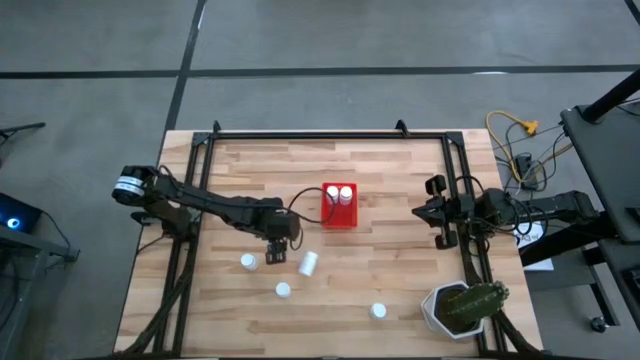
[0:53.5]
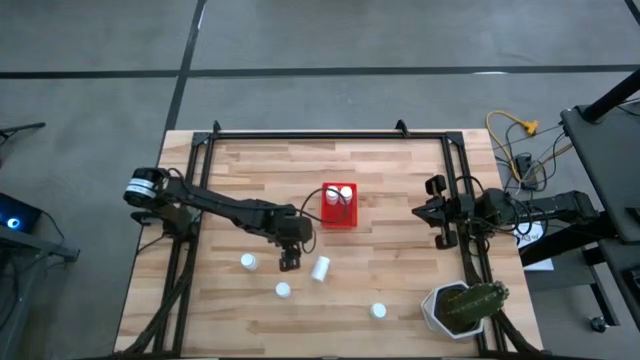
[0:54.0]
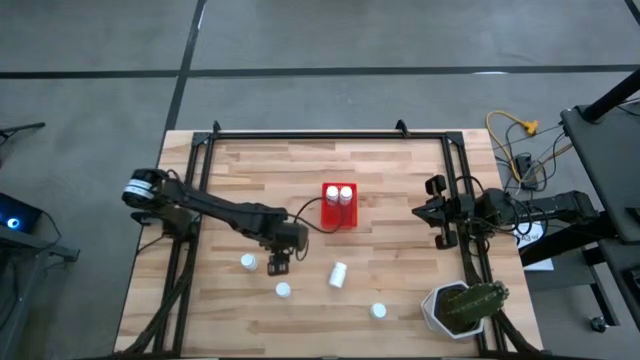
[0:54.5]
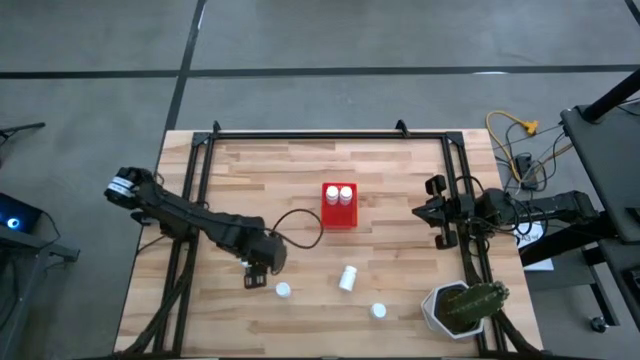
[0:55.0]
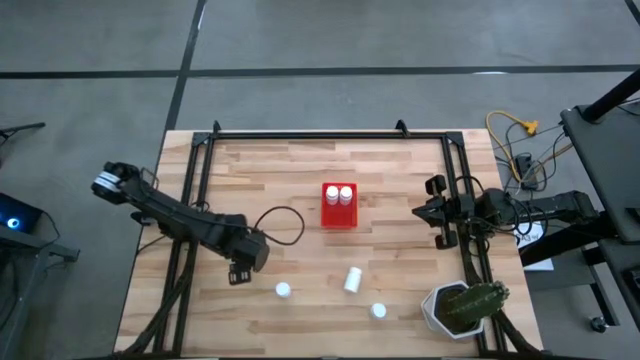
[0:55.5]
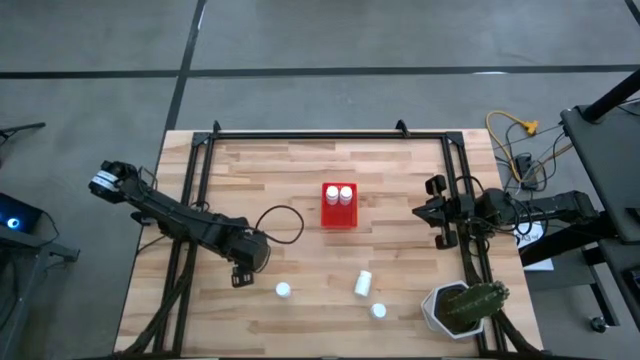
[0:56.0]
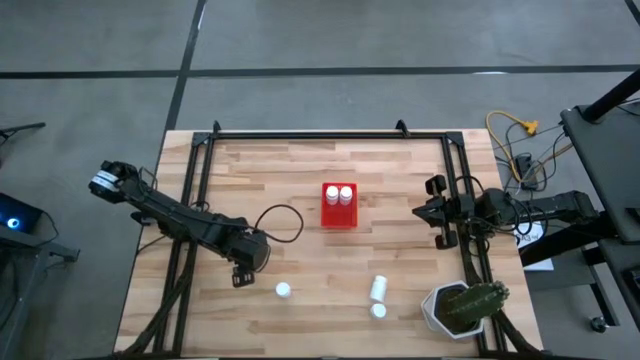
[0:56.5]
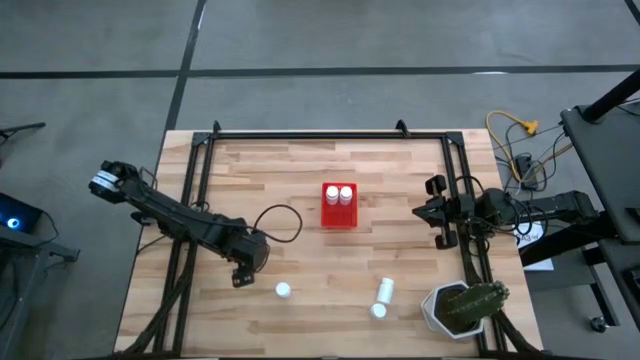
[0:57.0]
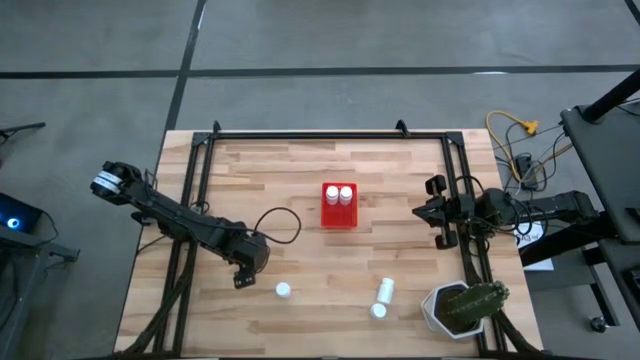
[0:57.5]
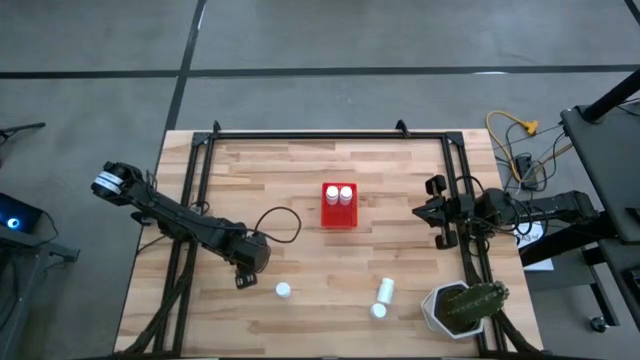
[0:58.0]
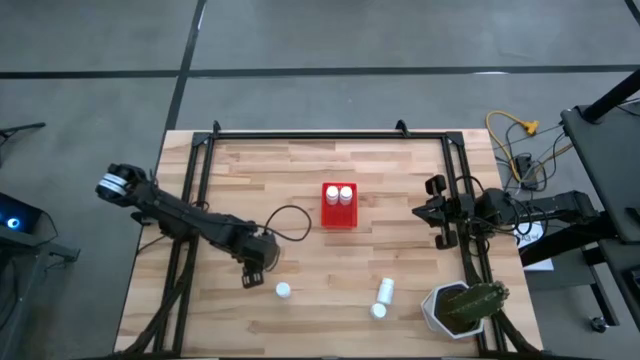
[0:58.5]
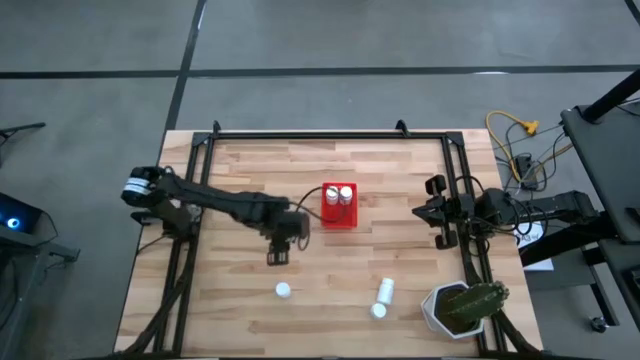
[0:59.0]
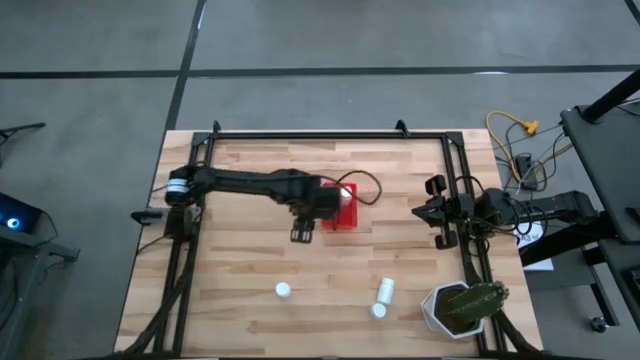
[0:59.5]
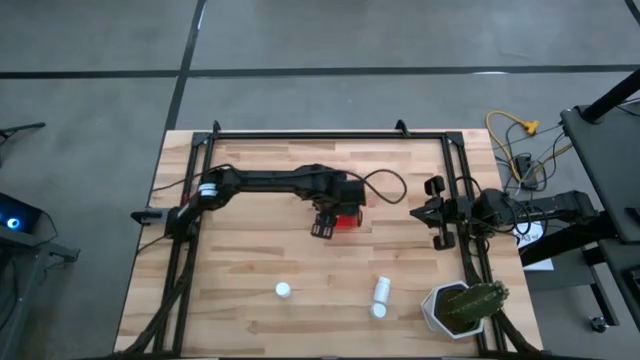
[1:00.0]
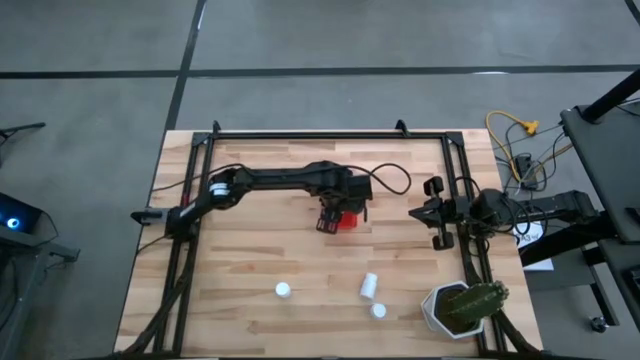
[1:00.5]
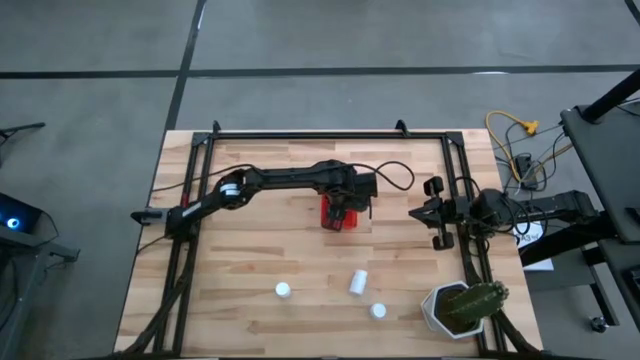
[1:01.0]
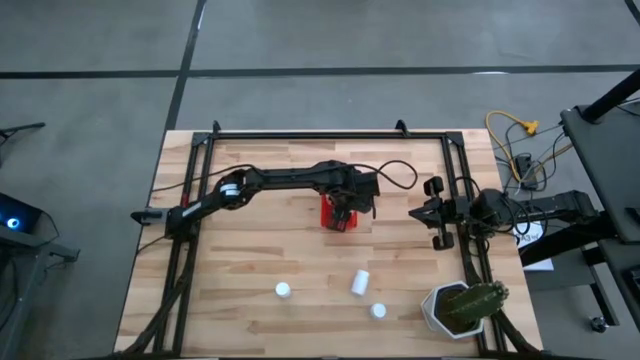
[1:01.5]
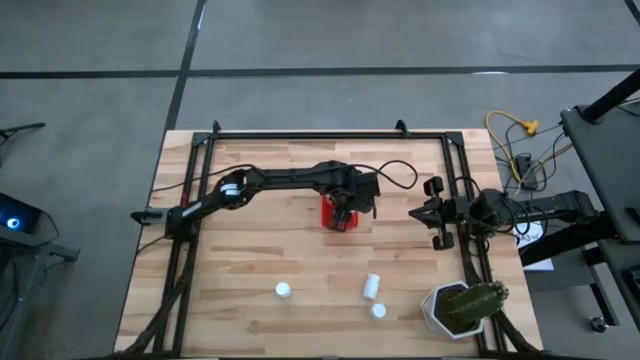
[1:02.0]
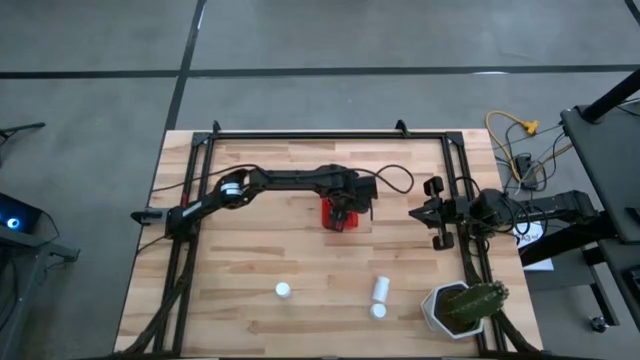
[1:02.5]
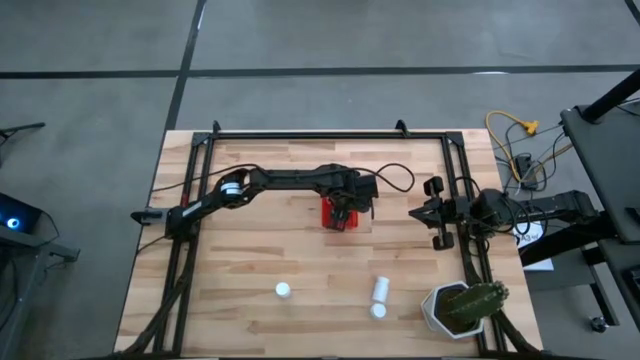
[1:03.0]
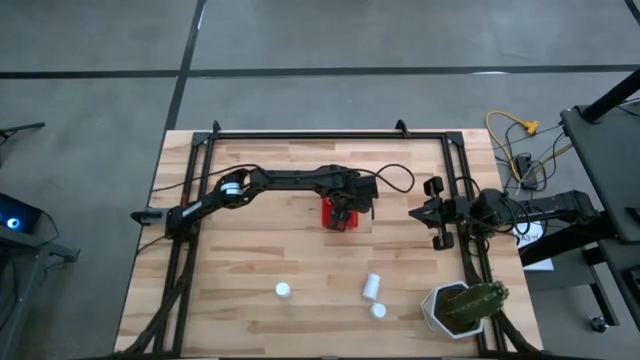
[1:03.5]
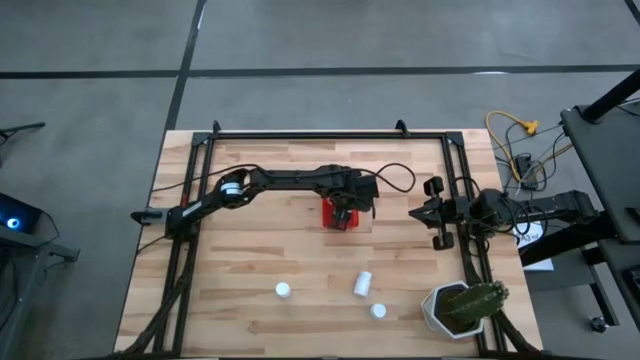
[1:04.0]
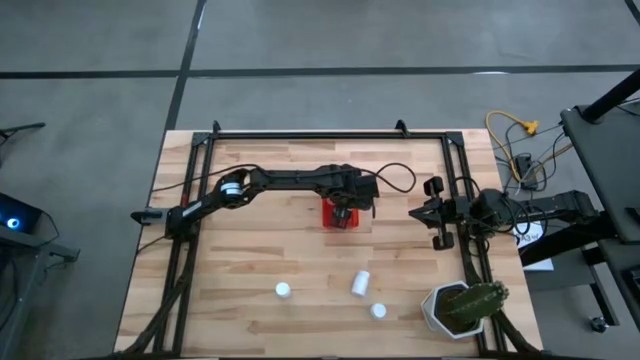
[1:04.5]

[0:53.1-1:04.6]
Task: Pick and place pill bottles into a basket
Put the top left white medicine bottle into the red bin

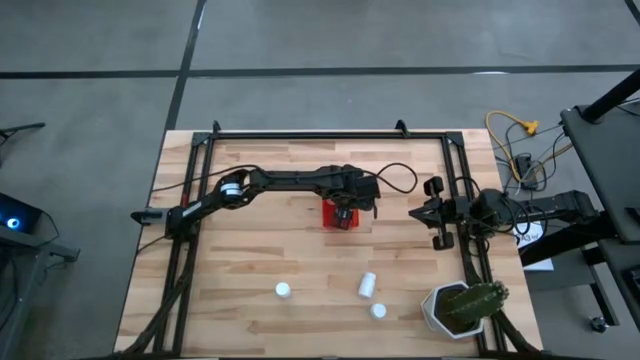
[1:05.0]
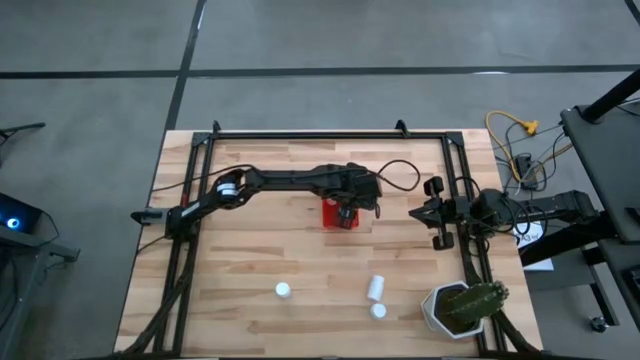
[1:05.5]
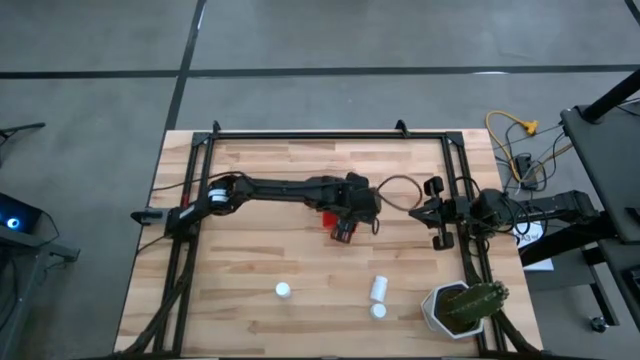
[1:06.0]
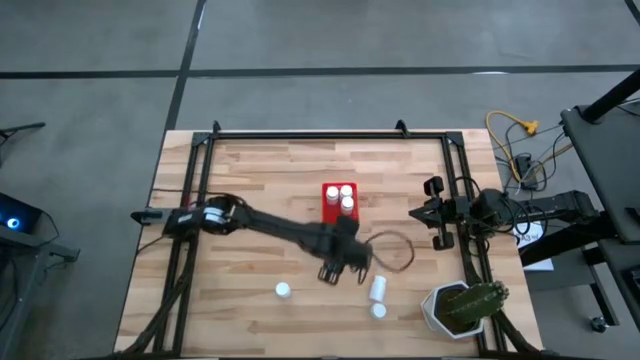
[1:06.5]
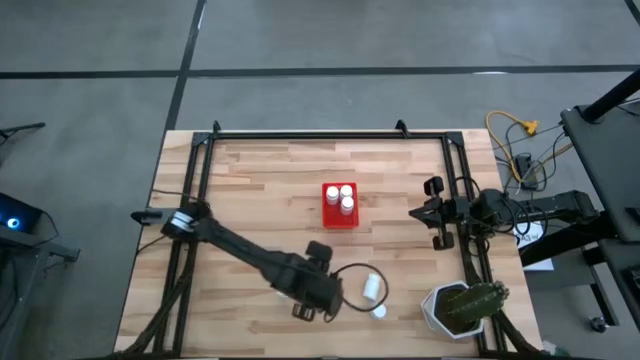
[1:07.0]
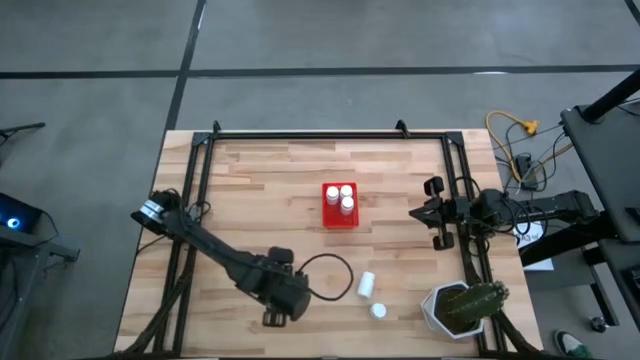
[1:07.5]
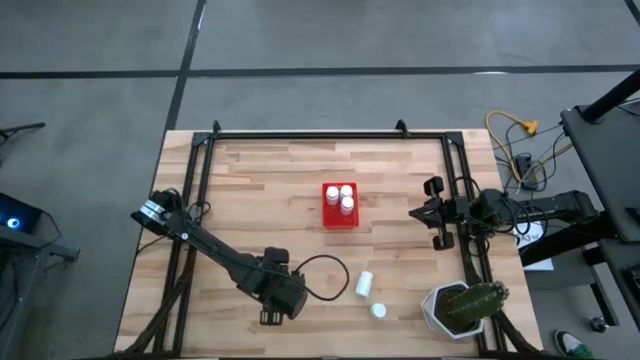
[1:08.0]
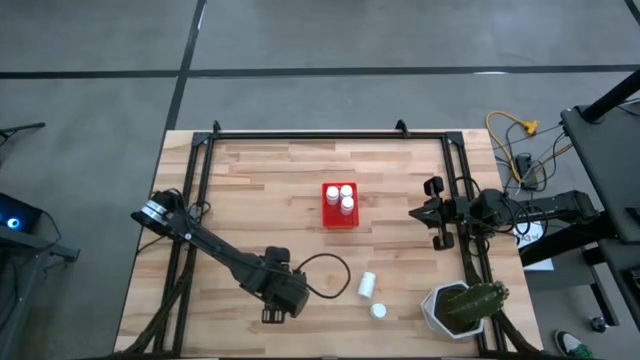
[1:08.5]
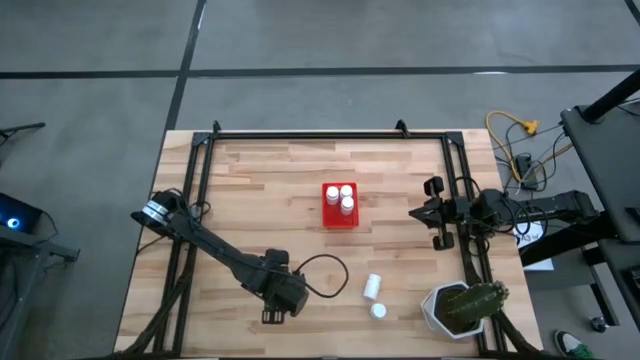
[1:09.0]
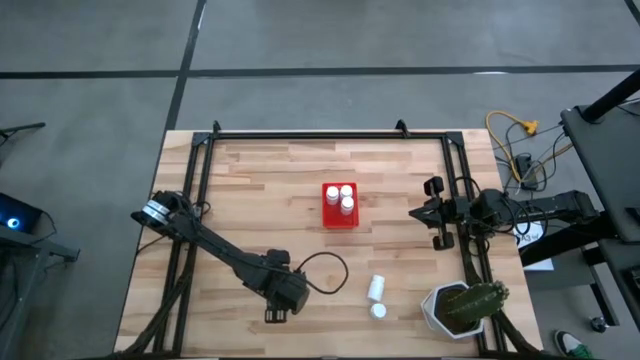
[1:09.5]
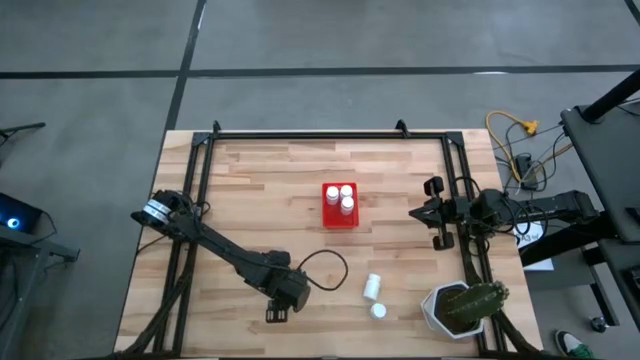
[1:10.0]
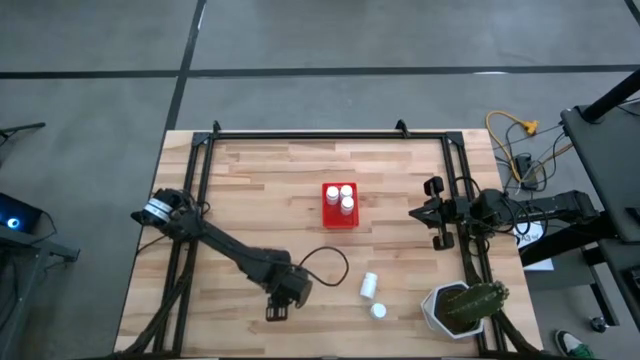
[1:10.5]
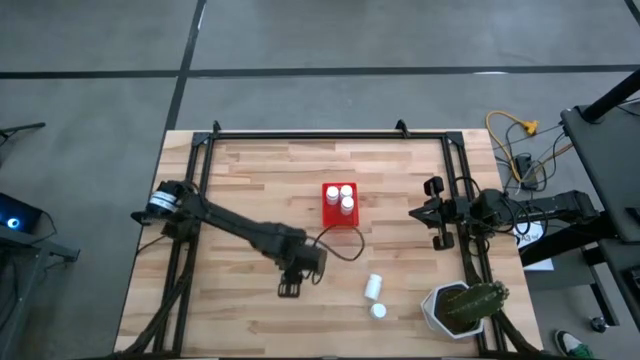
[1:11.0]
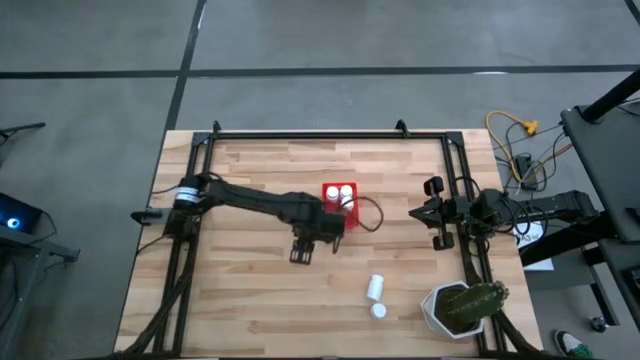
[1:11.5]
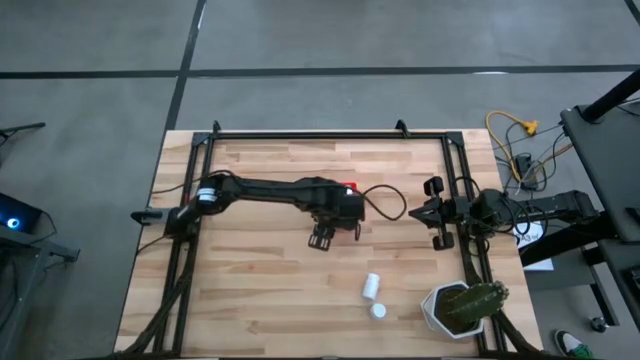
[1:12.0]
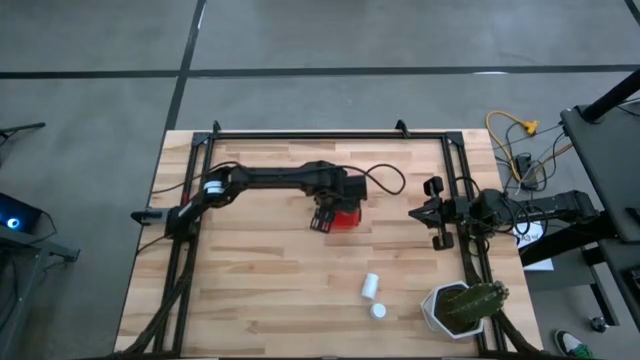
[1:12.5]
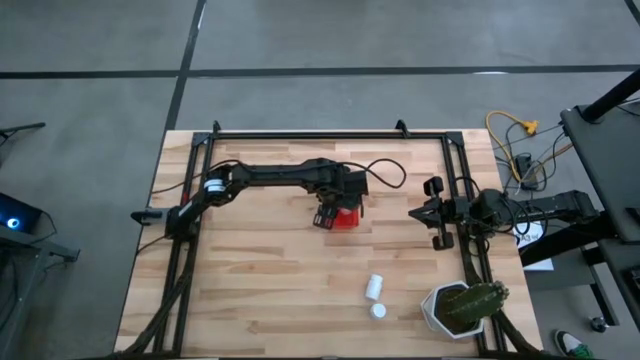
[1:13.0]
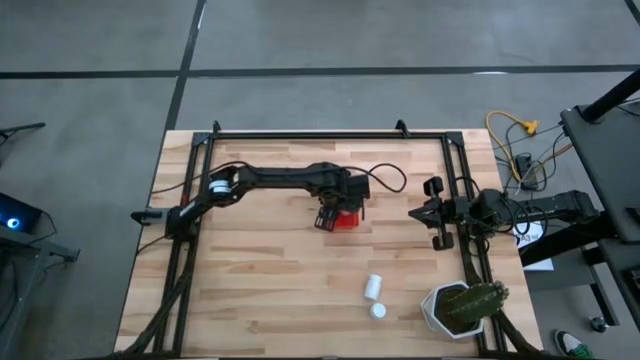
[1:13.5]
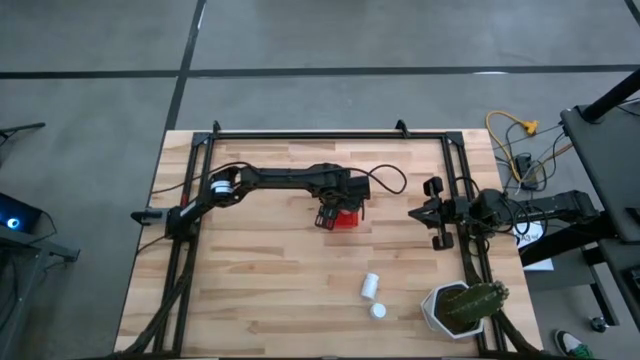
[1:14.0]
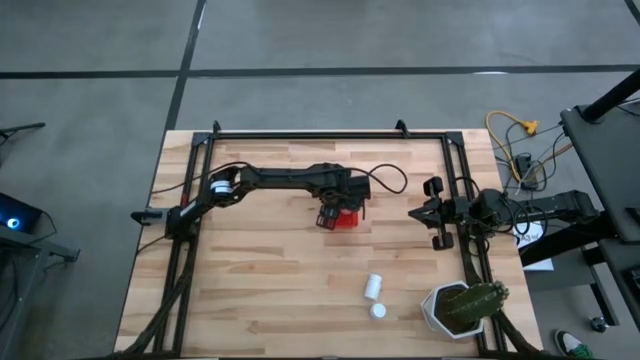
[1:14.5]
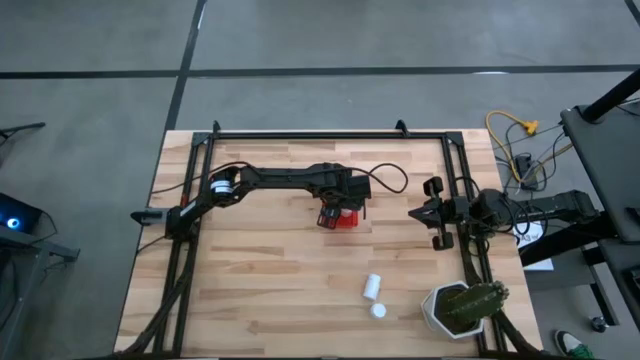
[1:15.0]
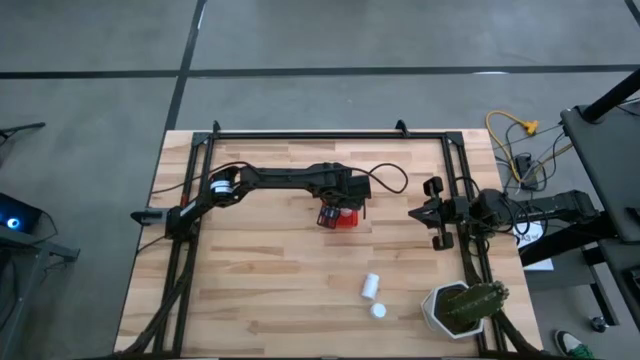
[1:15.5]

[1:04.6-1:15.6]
Put the middle left white medicine bottle into the red bin
